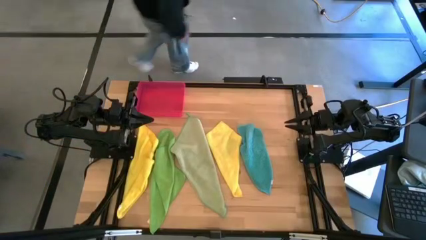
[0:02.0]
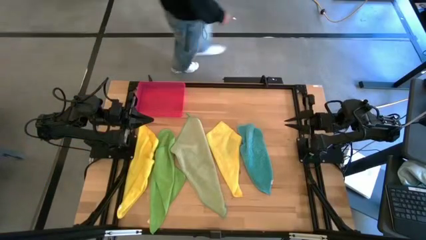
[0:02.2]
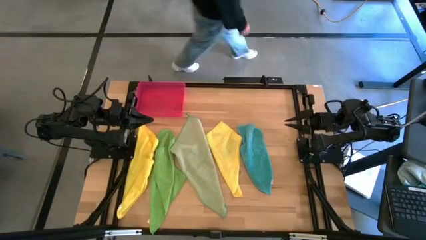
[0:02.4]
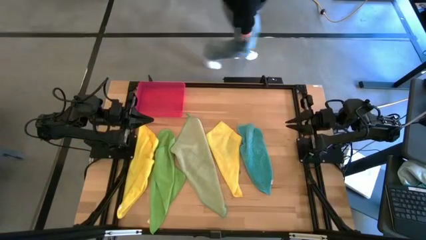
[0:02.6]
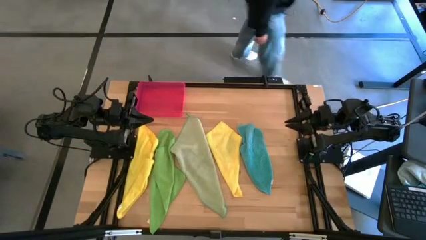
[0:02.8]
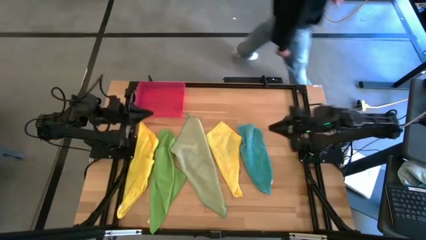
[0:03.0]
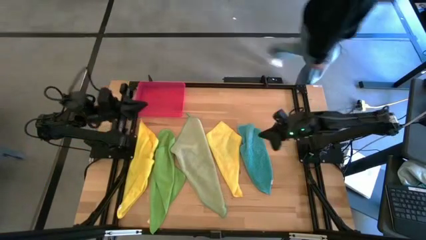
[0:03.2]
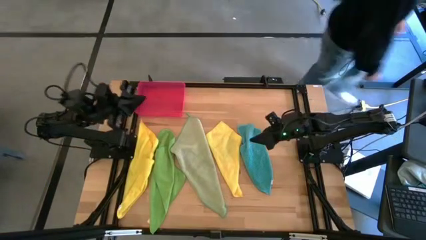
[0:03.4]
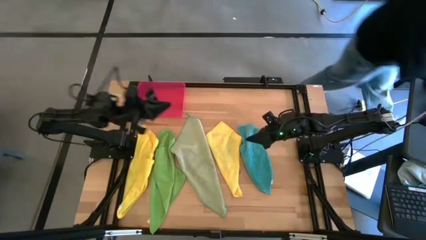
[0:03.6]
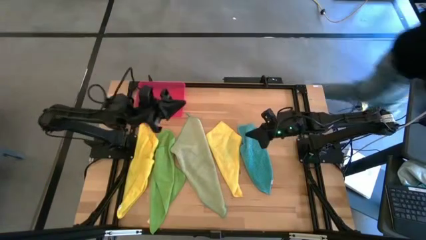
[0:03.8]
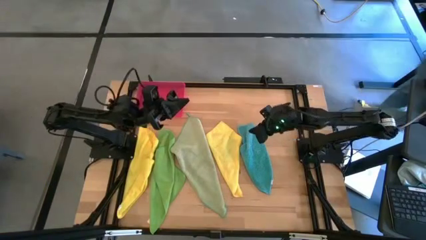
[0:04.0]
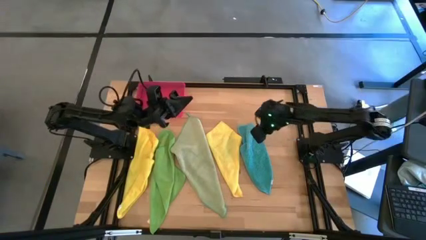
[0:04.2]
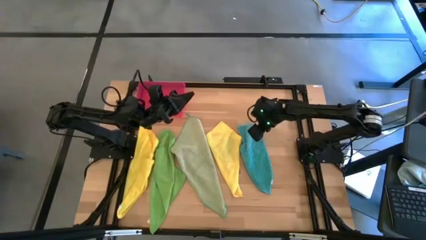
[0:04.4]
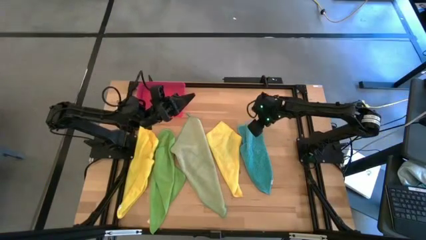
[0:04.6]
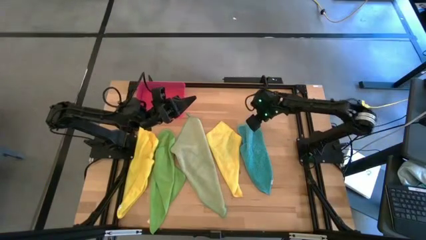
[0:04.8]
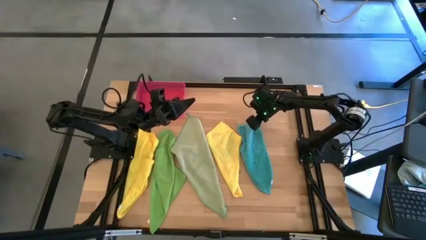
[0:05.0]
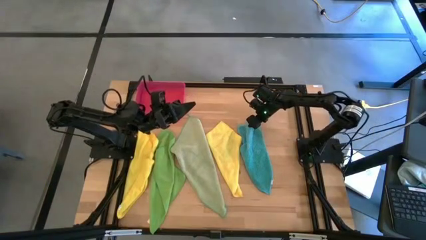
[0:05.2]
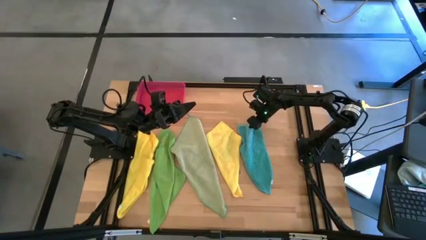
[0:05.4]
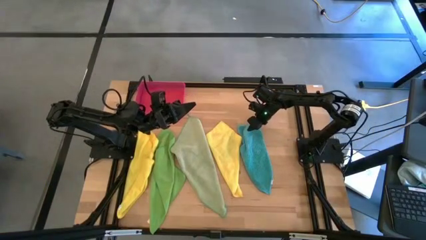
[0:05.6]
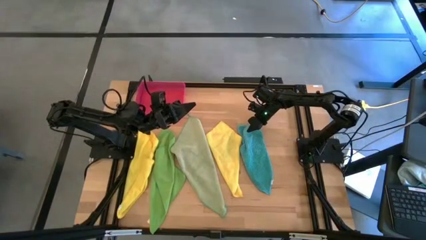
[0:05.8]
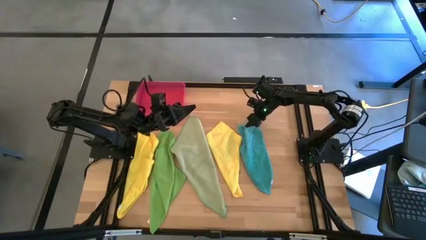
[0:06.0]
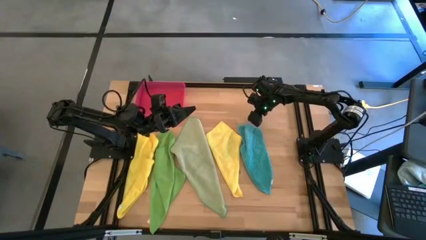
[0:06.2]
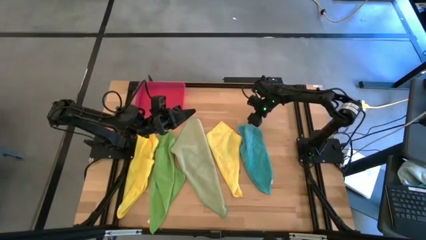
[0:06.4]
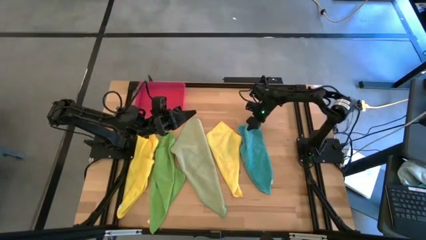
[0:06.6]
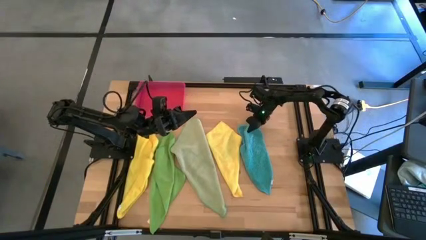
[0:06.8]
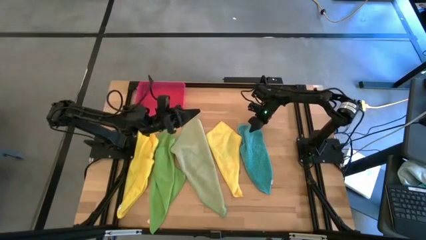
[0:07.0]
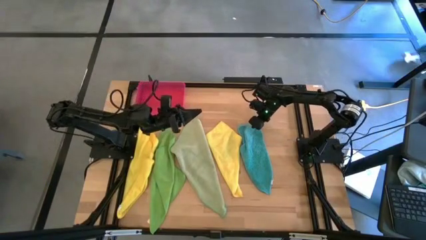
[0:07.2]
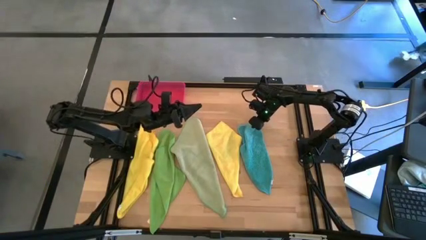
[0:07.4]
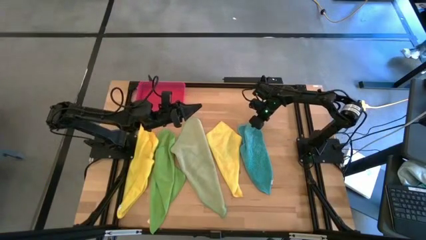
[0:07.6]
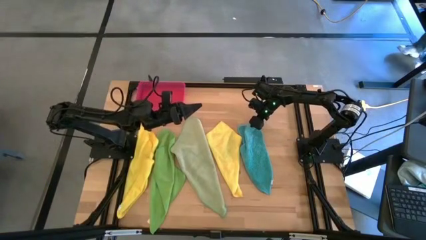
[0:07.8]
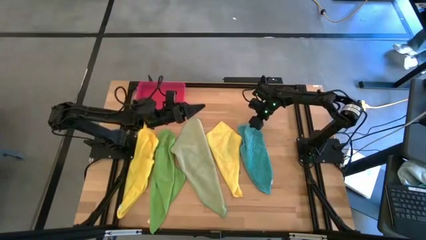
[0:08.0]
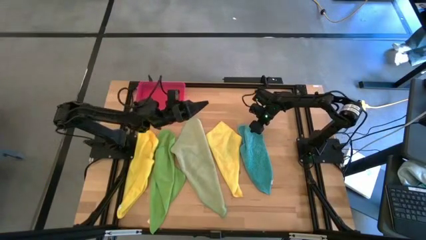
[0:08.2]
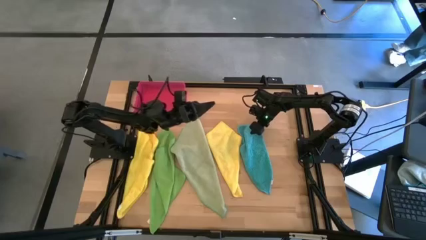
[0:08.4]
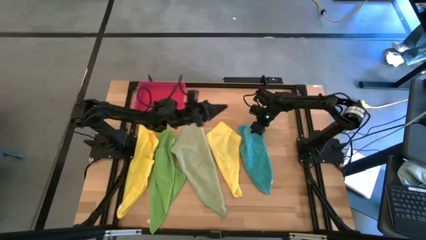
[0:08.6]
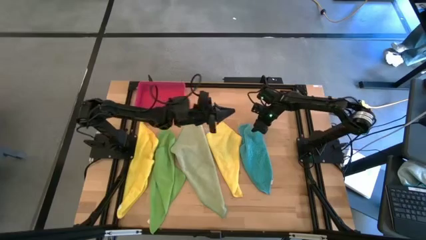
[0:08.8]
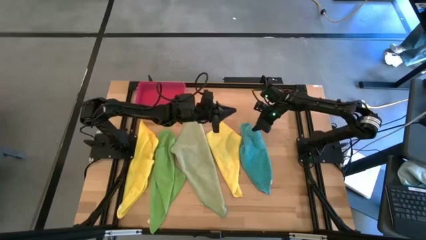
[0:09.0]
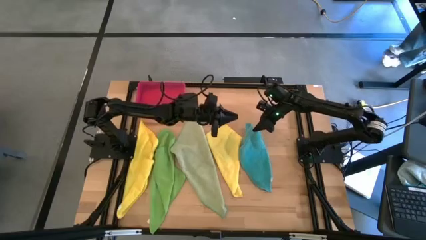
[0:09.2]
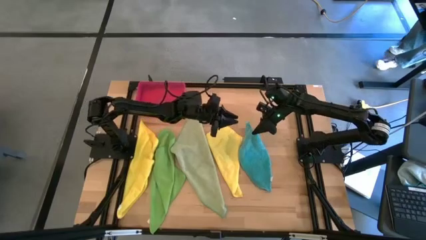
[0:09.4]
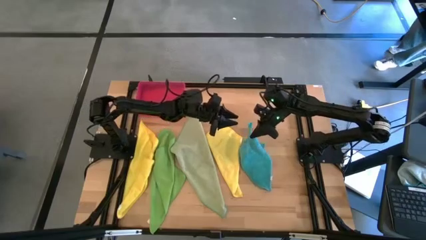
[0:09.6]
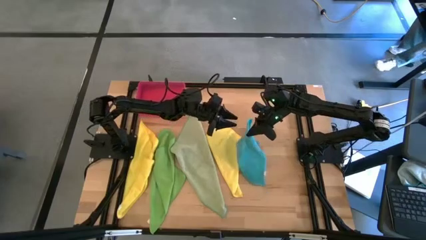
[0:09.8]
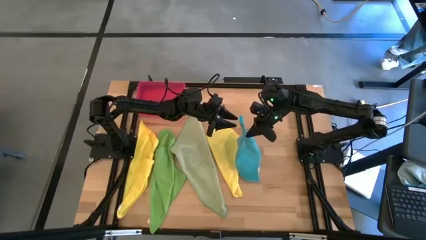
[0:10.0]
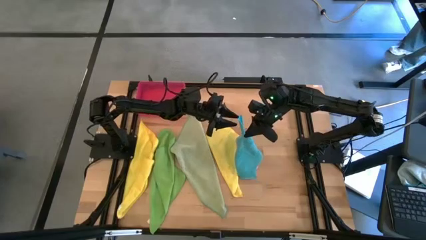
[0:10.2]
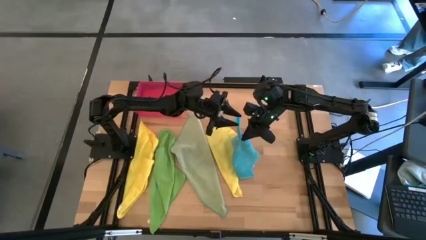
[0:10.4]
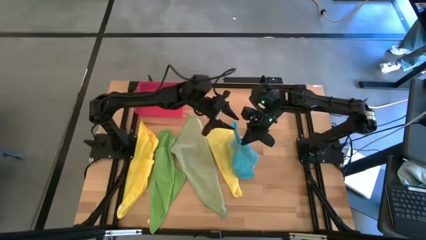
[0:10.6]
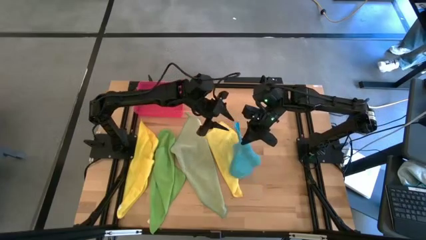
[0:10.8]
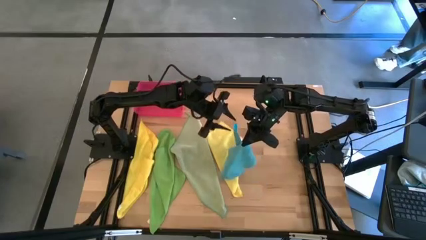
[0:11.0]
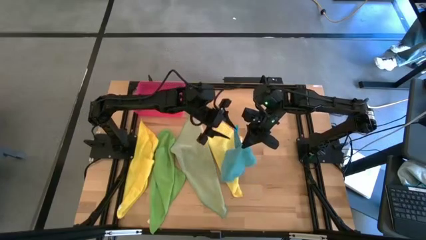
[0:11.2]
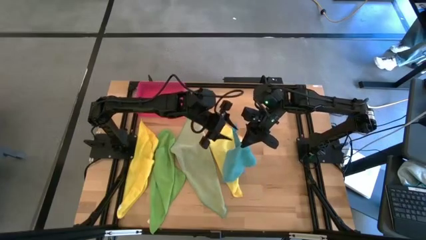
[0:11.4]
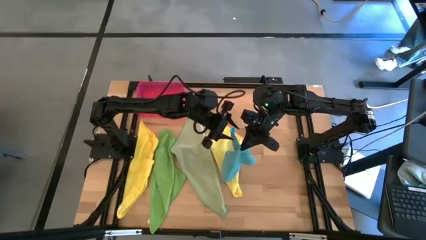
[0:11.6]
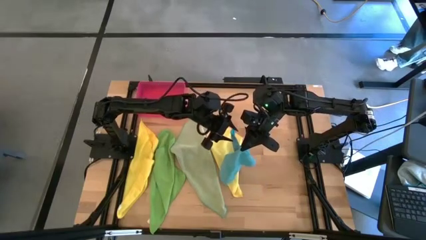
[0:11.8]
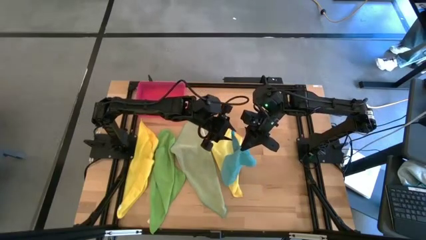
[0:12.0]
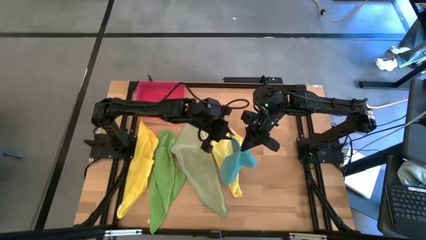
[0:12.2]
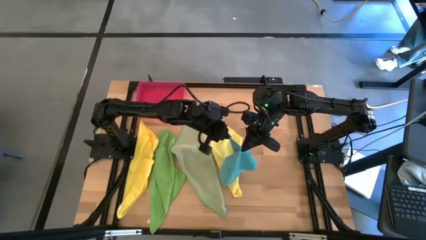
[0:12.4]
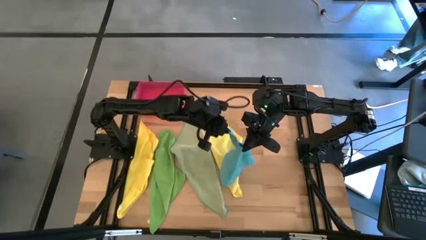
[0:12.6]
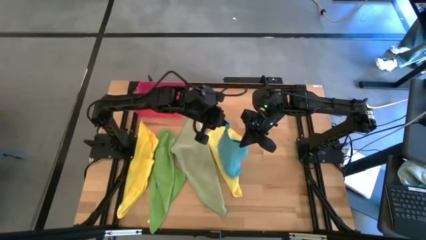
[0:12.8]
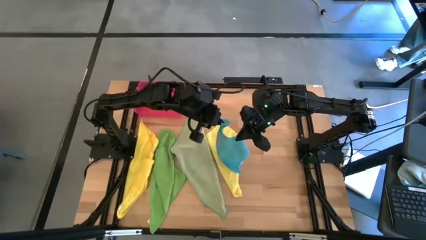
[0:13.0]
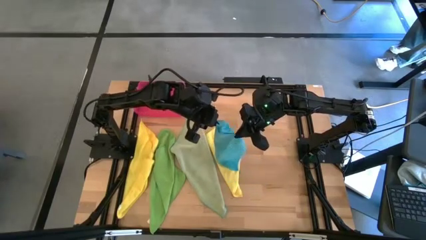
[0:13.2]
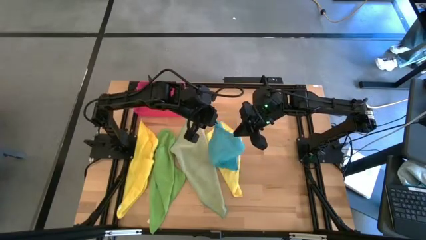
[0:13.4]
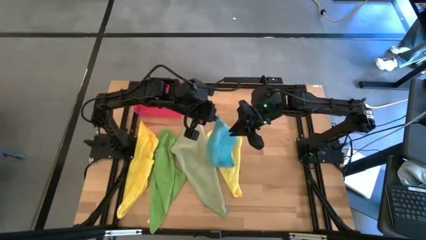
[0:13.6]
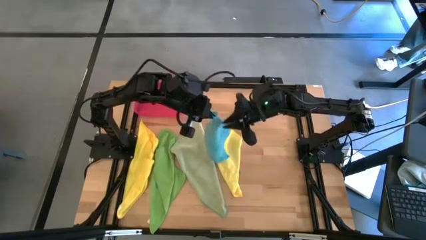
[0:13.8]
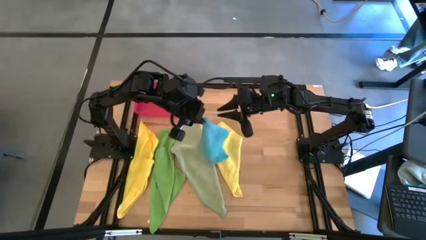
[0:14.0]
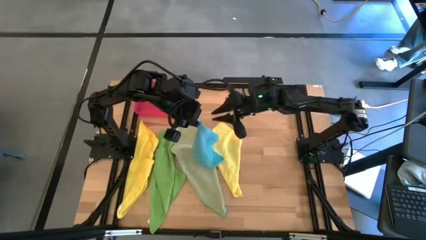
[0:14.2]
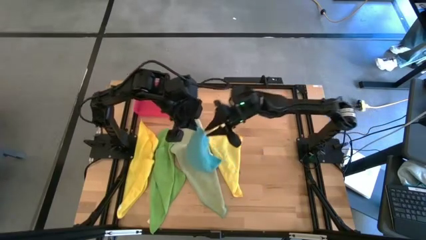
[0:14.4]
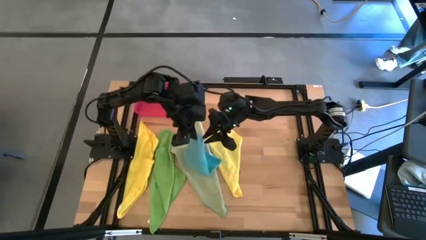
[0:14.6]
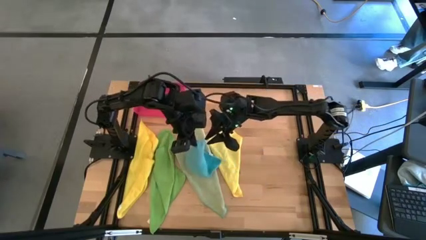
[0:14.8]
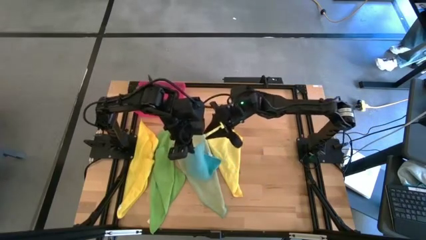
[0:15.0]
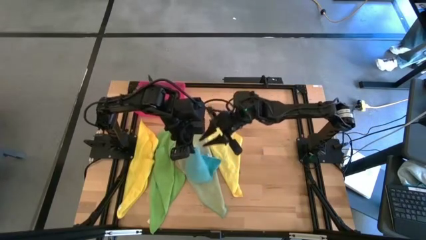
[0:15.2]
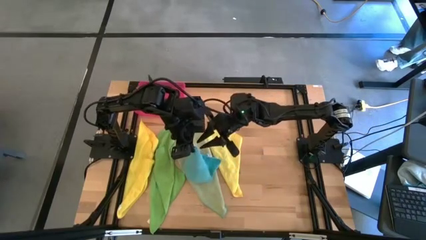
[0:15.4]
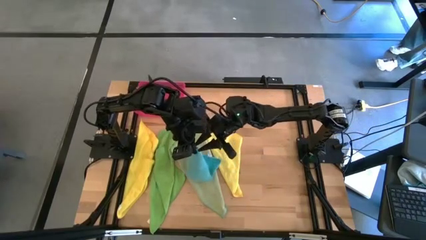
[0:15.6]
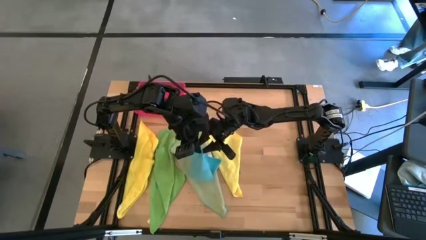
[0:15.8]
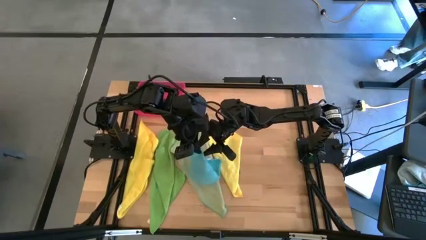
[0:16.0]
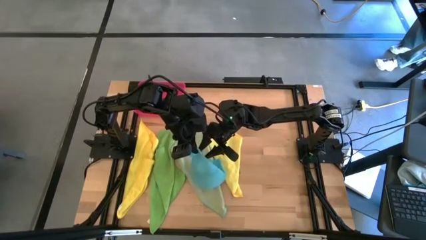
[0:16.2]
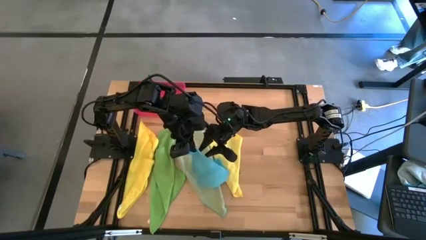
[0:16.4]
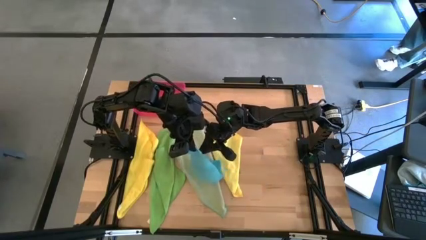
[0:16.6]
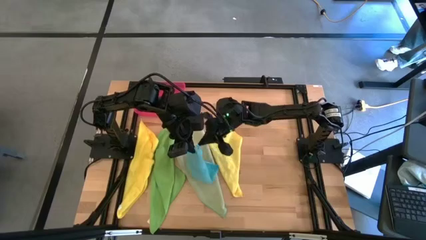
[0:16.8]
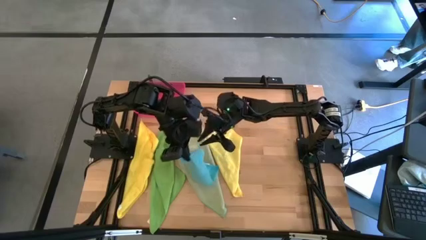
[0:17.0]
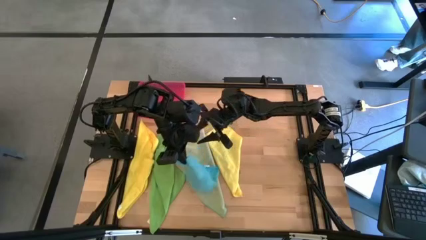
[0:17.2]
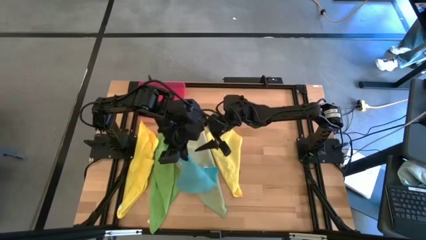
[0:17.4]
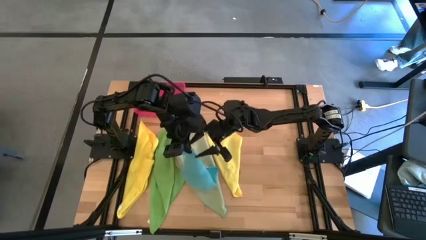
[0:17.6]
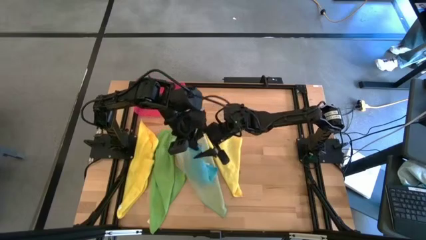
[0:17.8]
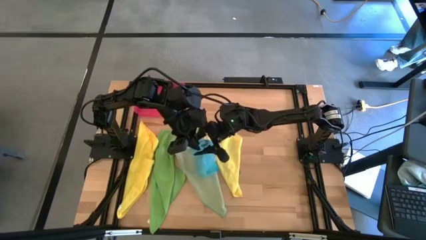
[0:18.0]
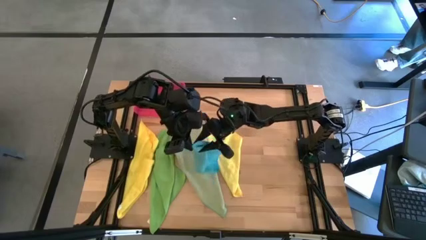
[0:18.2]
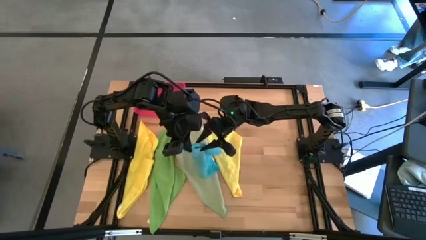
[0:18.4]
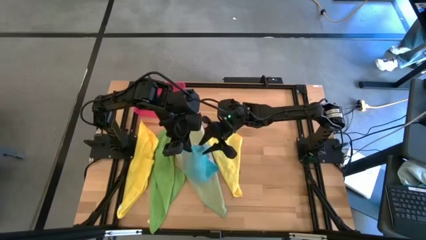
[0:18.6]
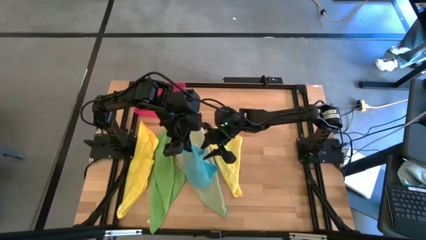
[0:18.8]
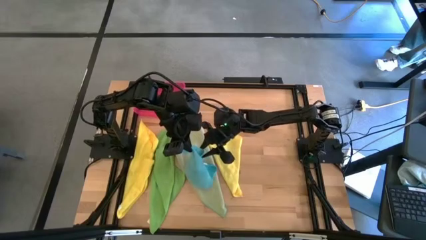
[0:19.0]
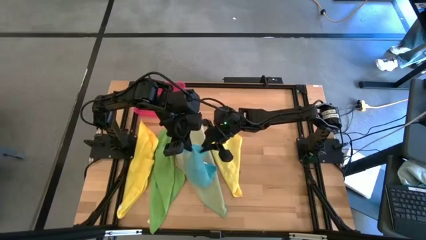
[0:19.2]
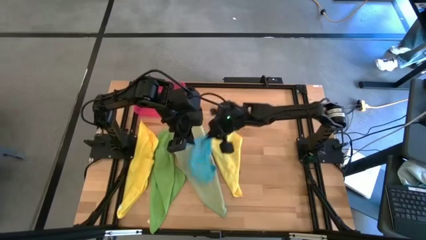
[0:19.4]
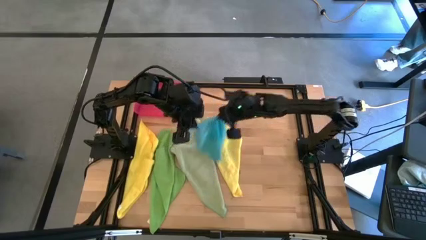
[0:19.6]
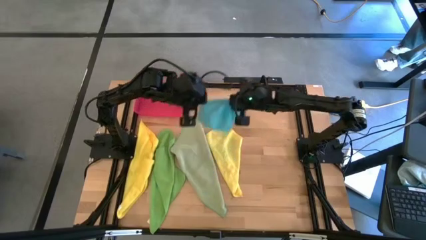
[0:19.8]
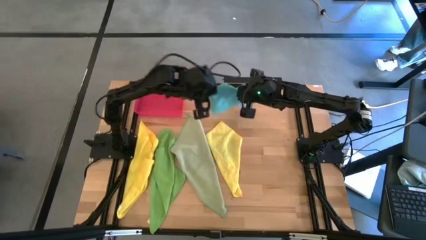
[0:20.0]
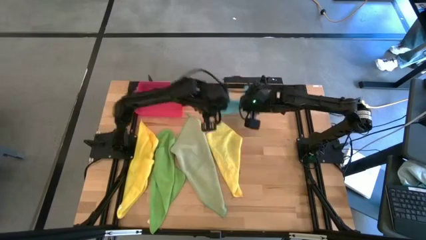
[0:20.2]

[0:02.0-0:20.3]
Task: Fold microfiber towels
Fold the blue microfiber towel
